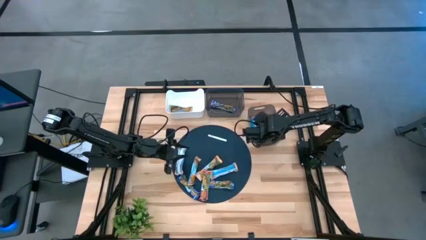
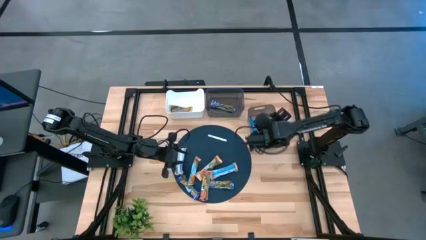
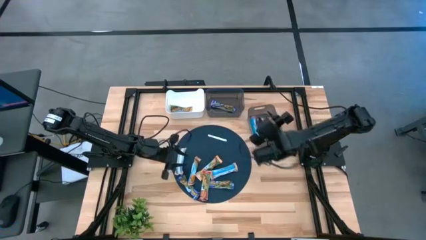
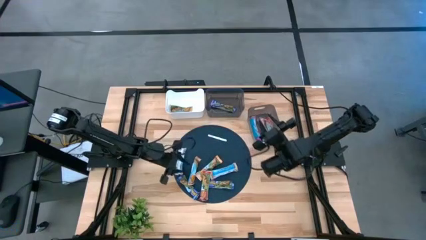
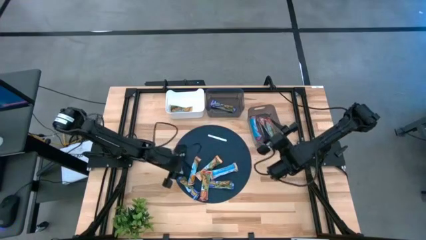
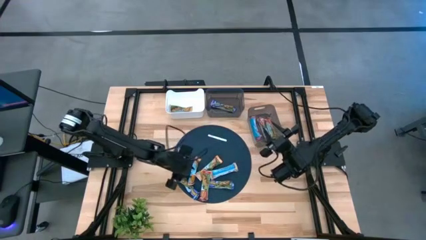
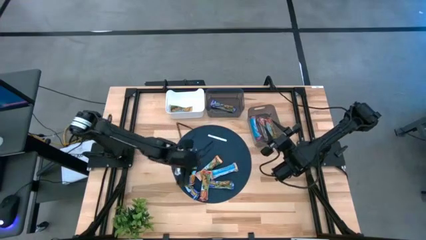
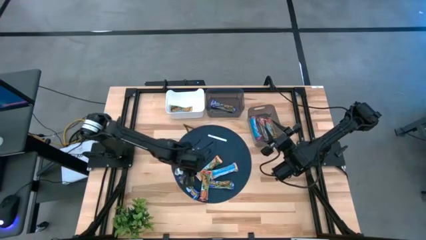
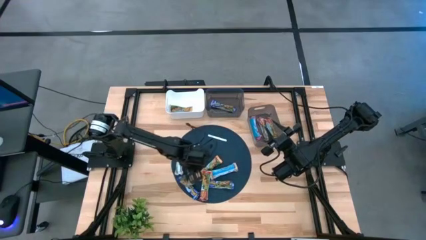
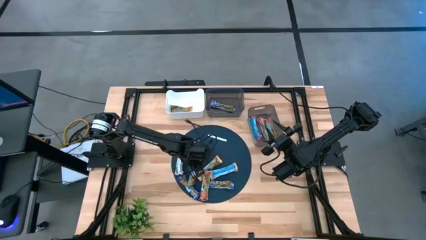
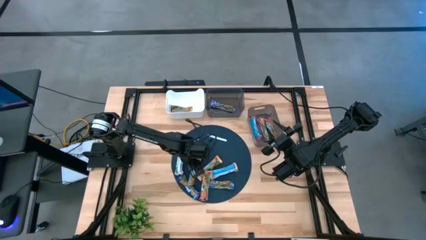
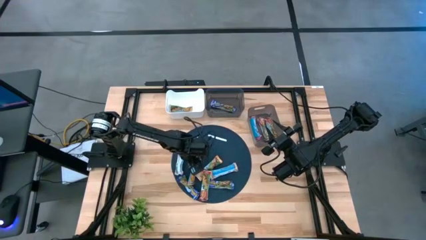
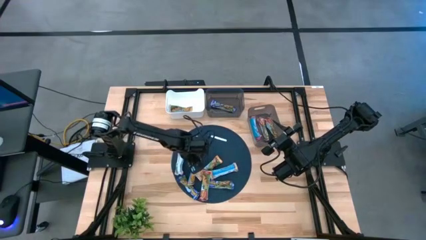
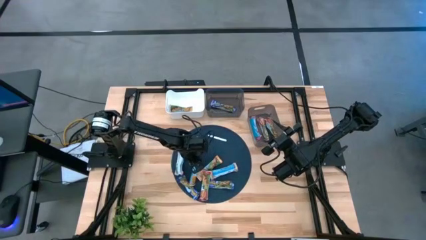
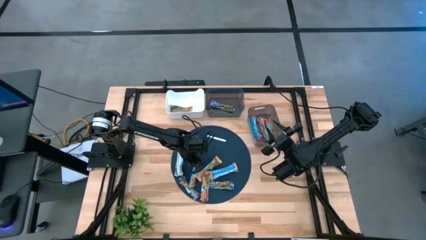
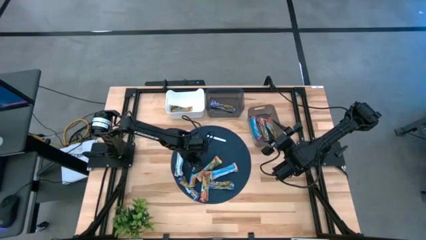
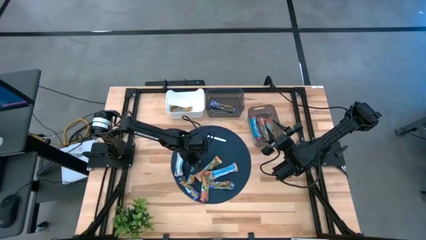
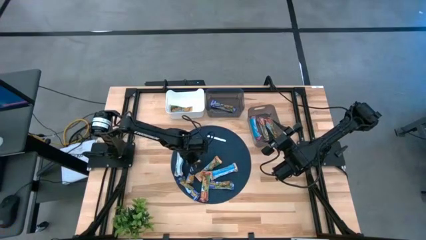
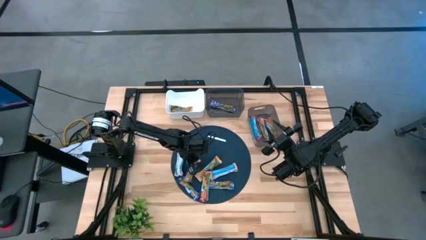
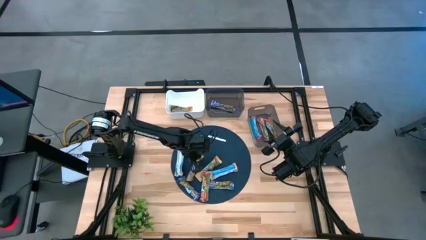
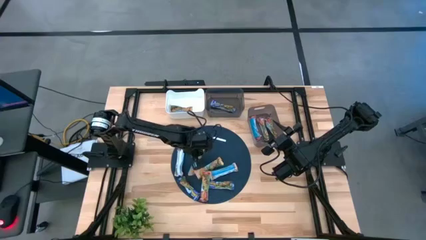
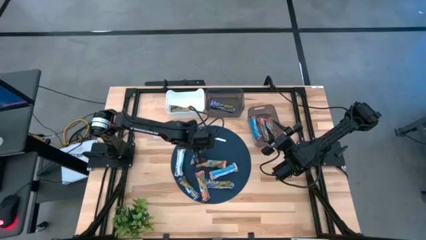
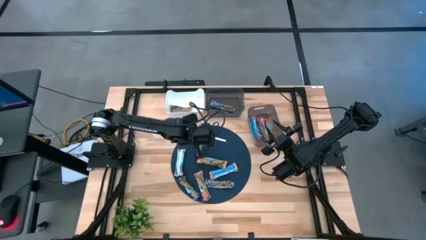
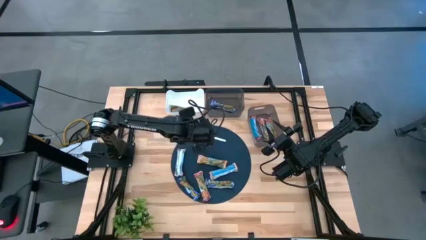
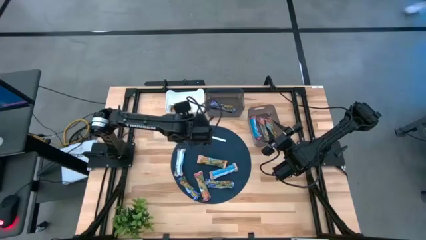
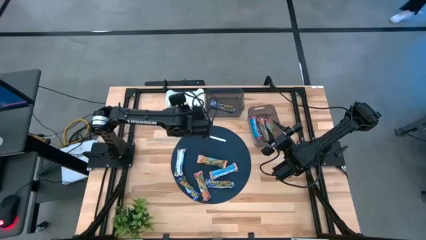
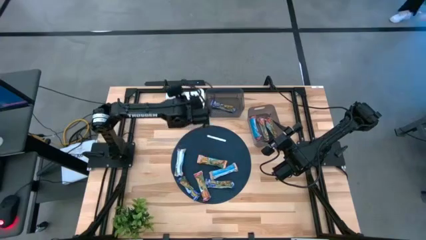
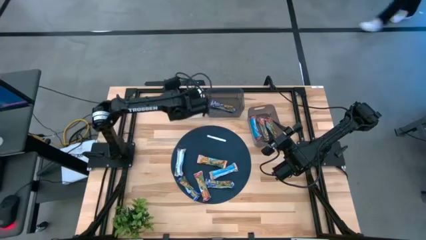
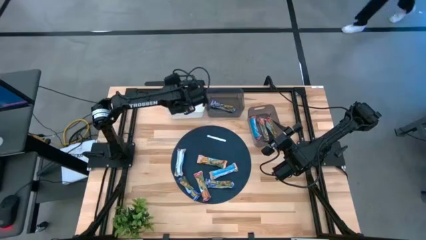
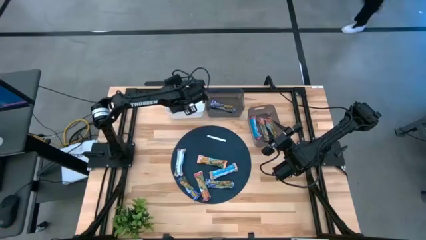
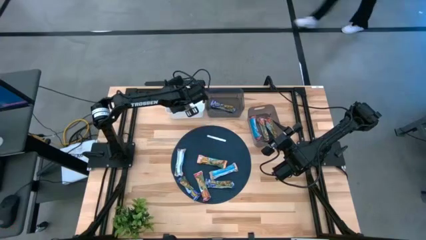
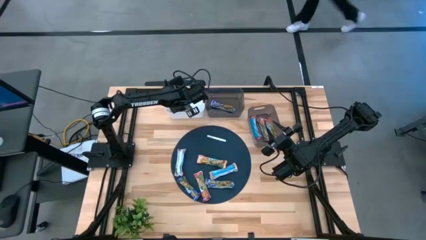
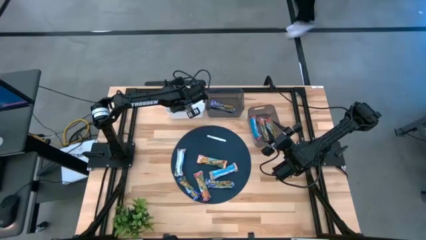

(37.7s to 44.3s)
Task: Pick and place Granola Bars by type
Put the yellow granola bar into the white bin

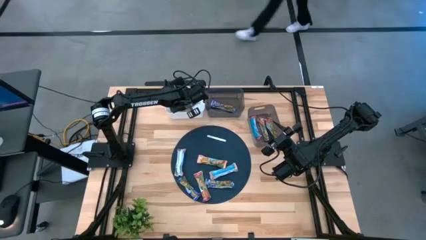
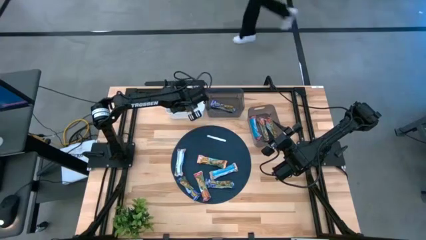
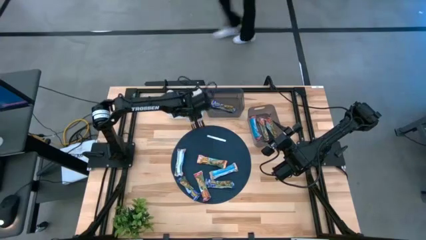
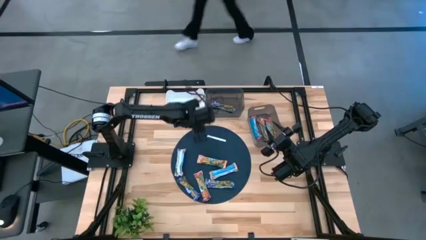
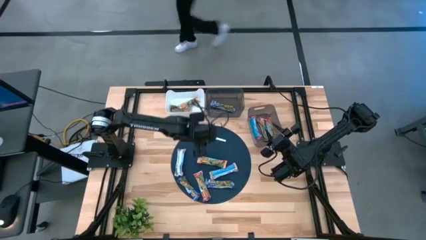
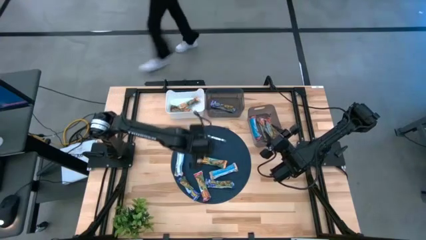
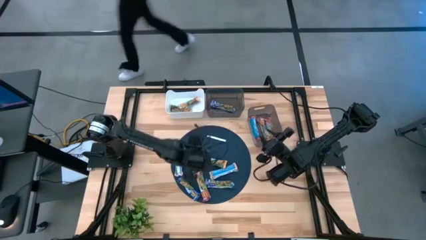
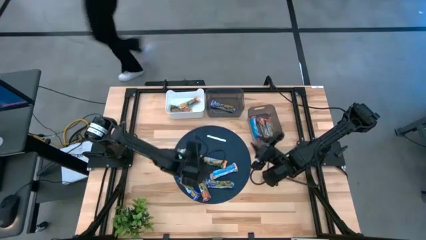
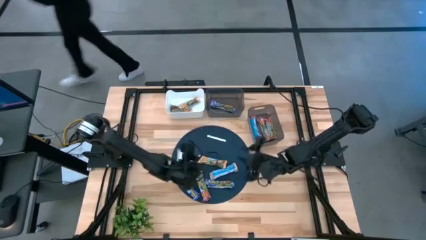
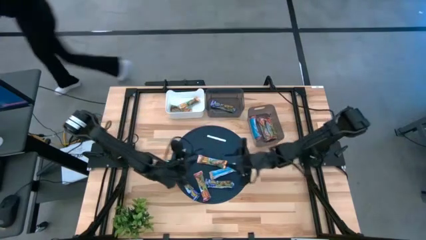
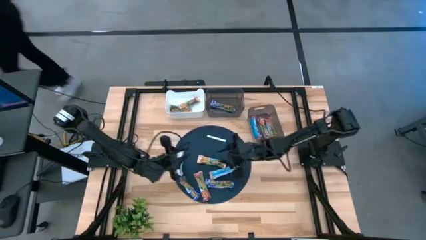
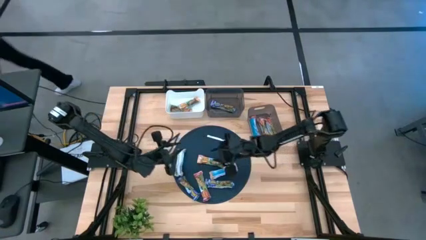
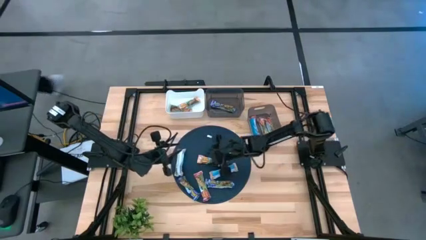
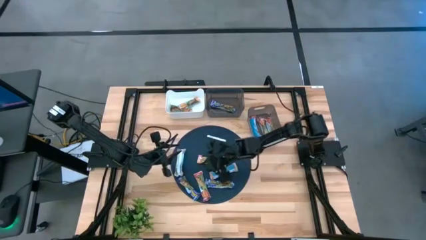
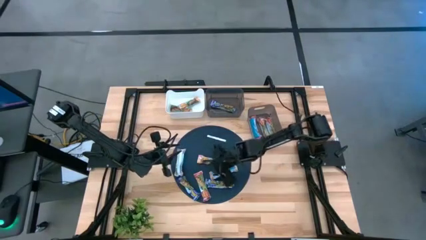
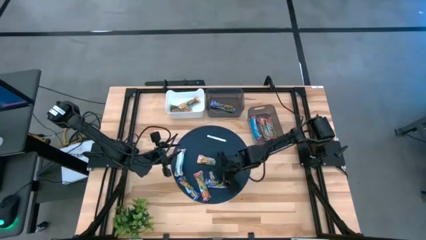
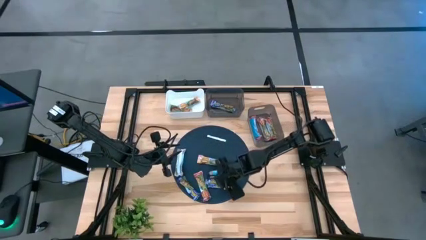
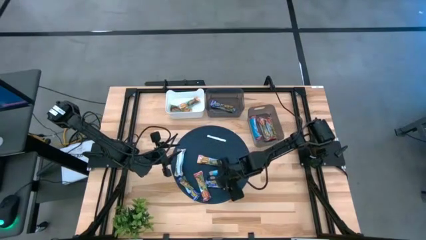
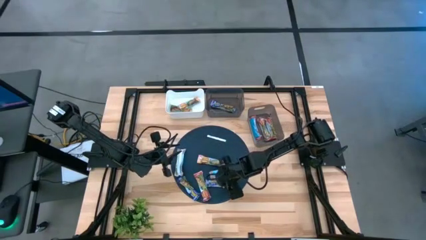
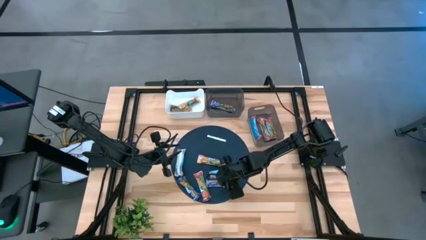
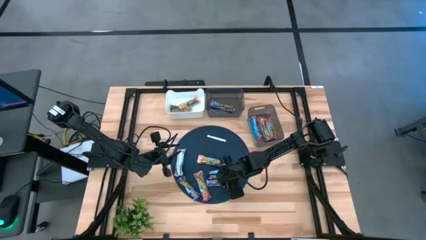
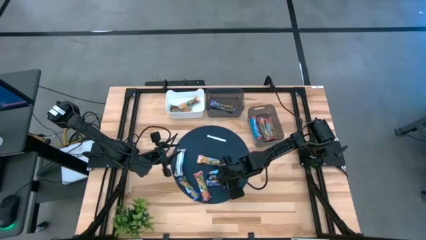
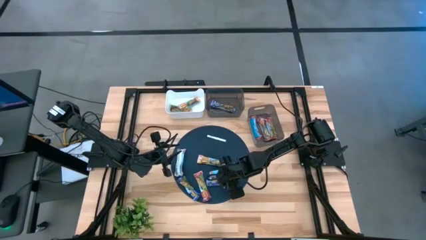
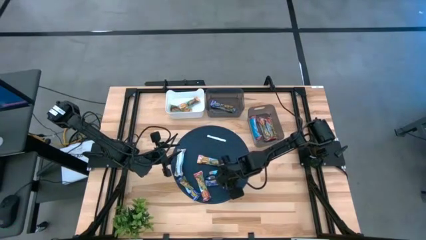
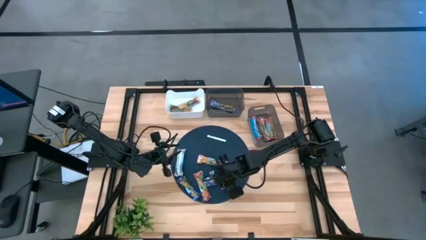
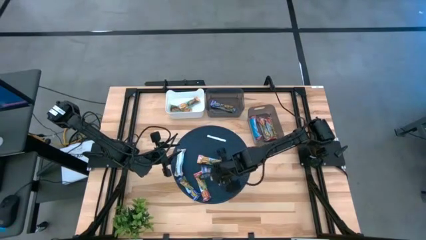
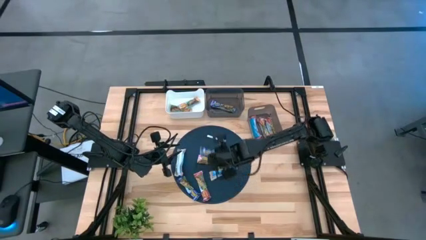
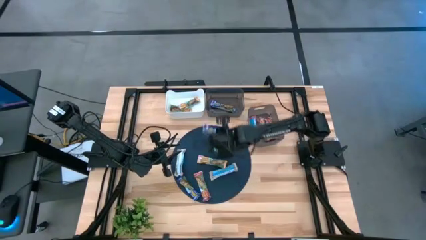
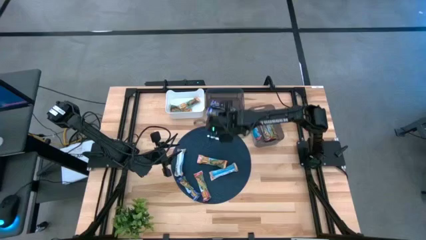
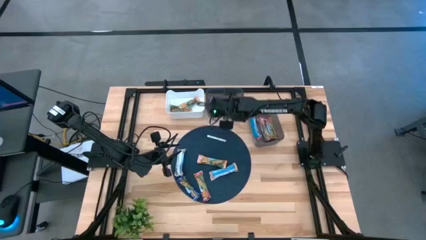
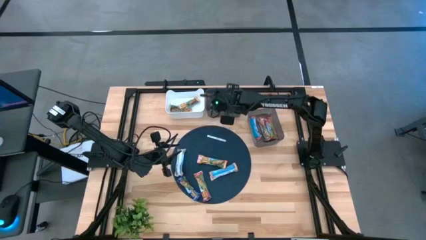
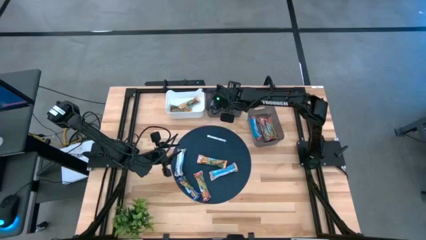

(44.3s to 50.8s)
Put the blue granola bar into the top black bin

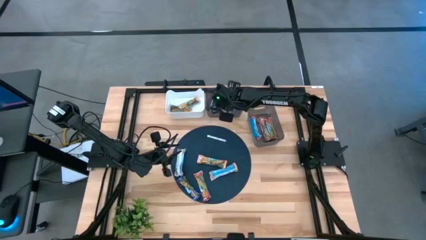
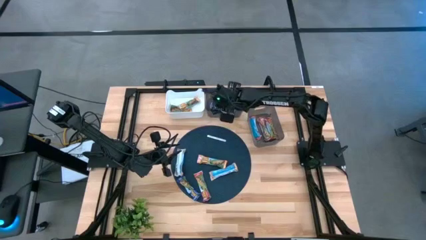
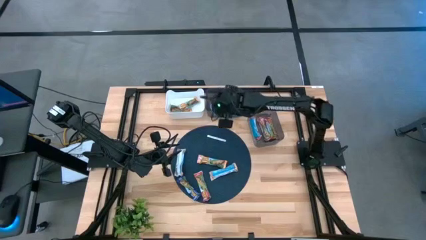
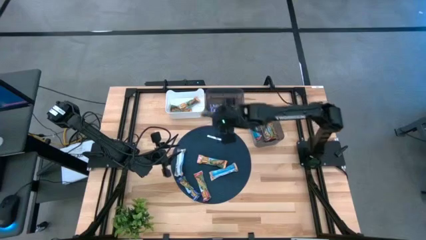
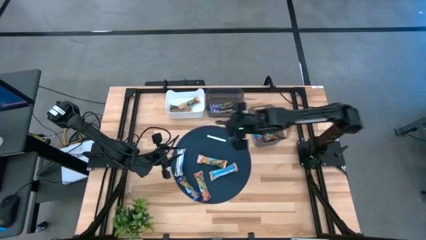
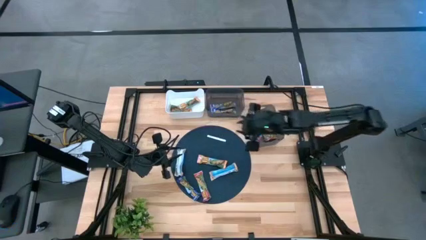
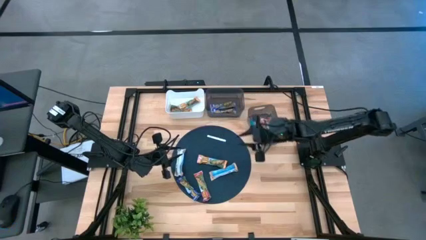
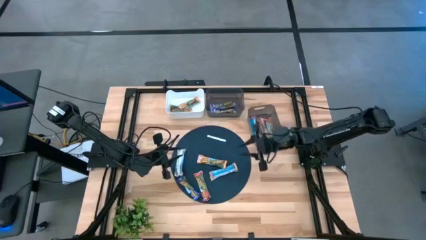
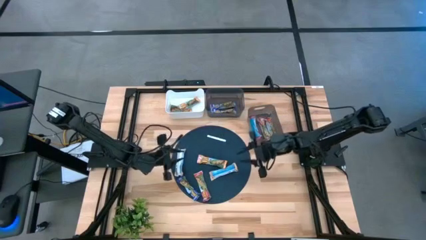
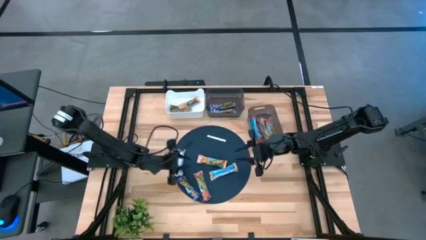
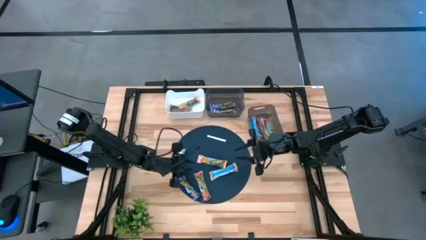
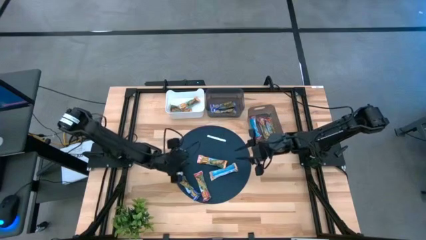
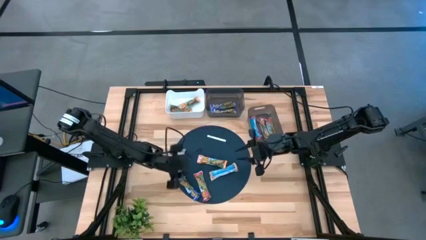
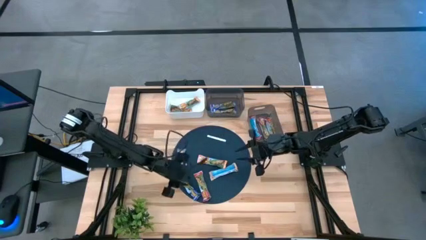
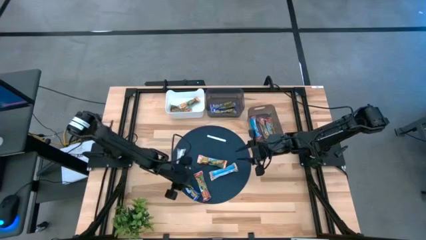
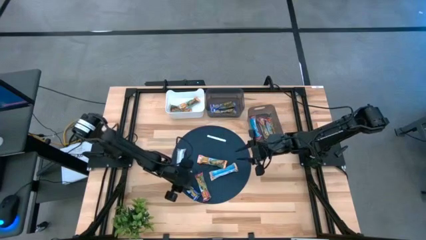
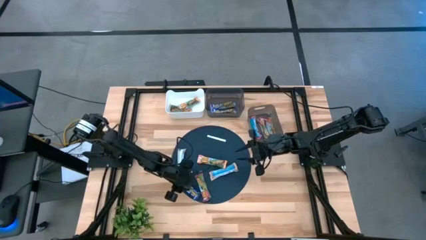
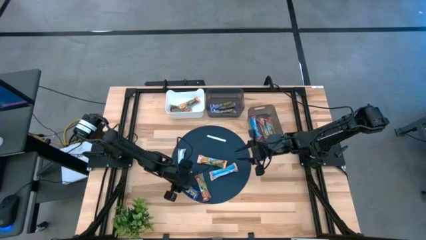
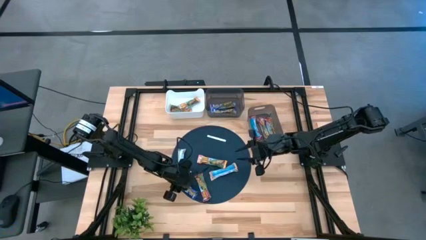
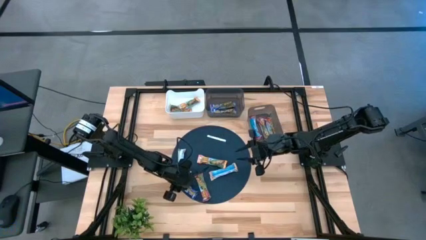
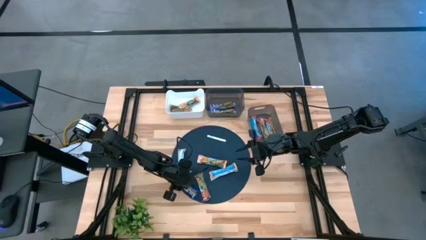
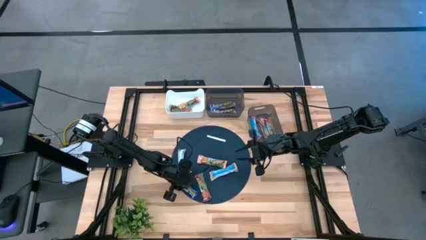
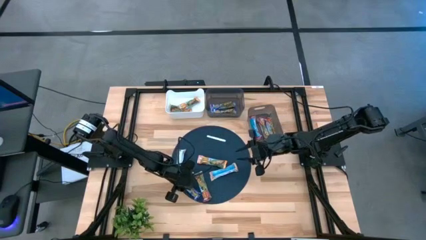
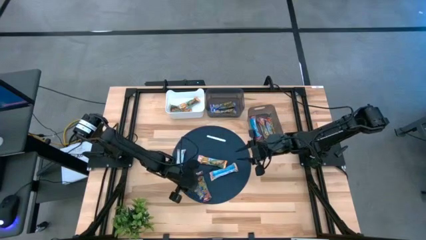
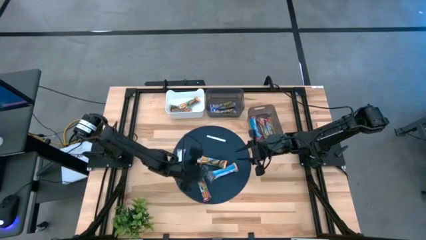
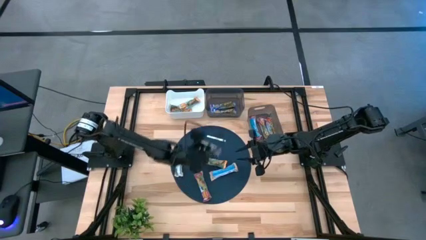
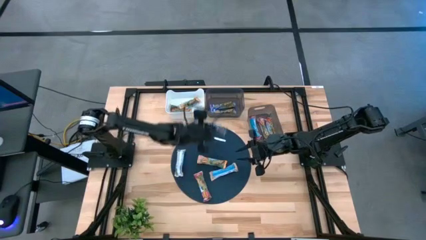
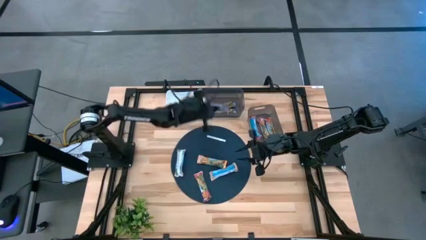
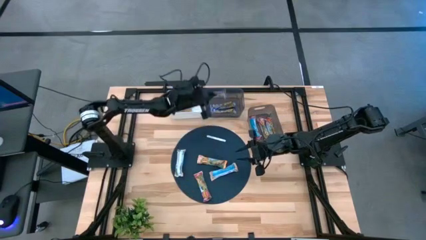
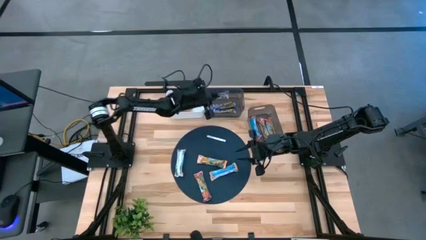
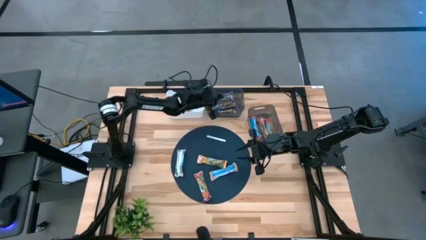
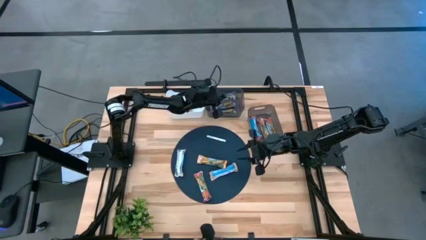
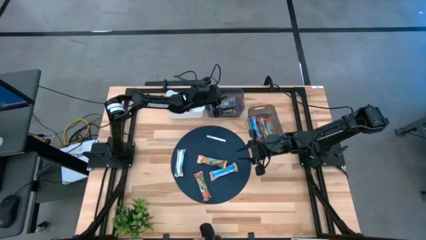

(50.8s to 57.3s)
Put the blue granola bar into the top black bin
